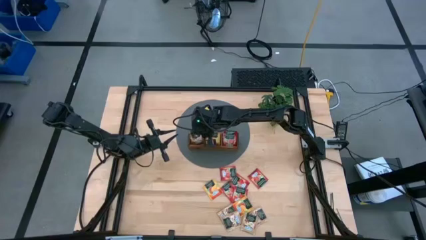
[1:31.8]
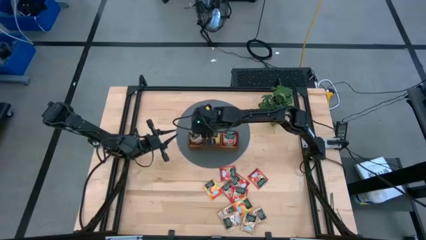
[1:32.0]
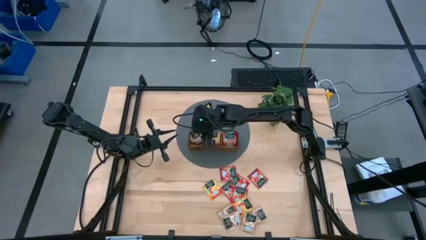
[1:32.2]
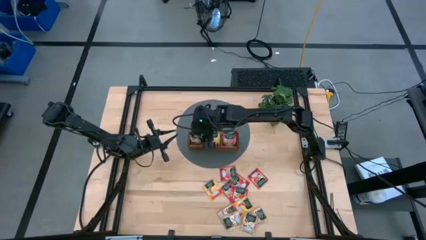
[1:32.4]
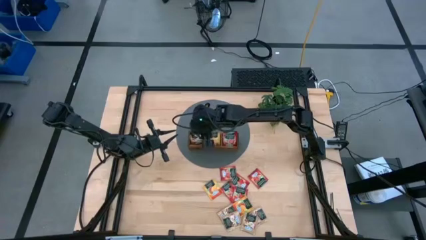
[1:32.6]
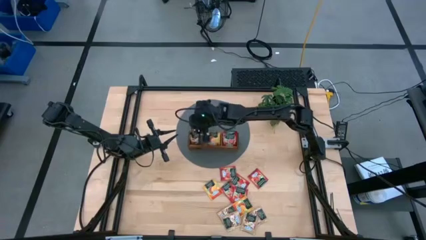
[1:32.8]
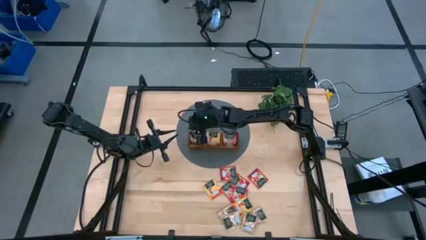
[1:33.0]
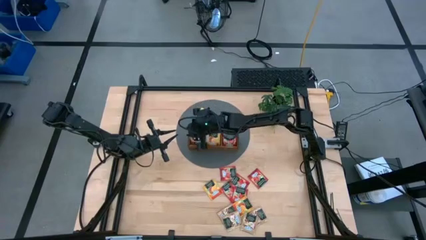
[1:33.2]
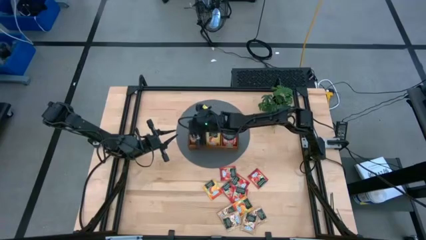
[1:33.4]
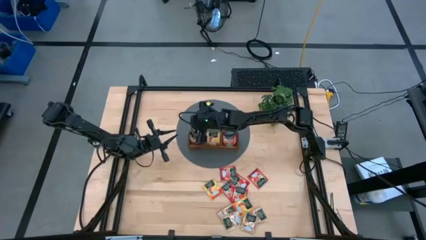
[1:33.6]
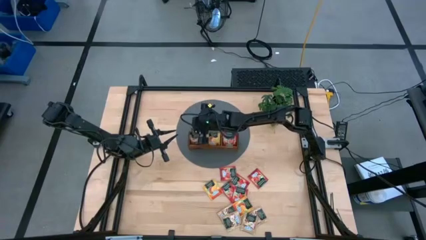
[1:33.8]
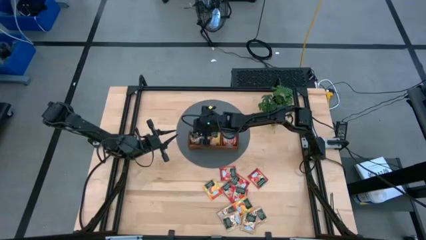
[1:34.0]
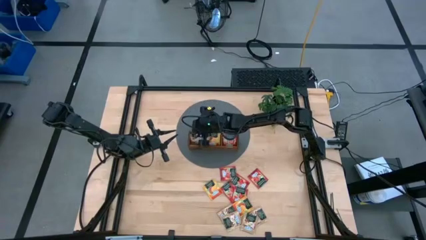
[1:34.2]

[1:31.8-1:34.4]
Task: Pick & Place Tea
Adjust the brown tea bags into the left section of wooden organizer

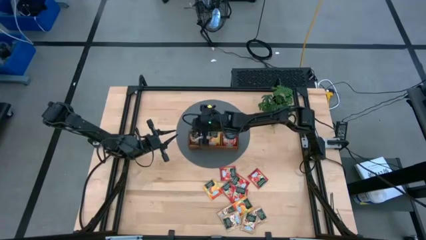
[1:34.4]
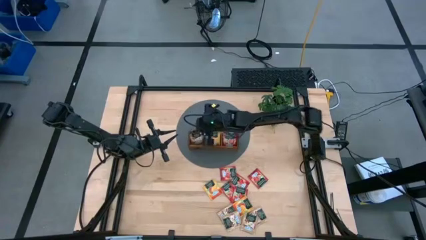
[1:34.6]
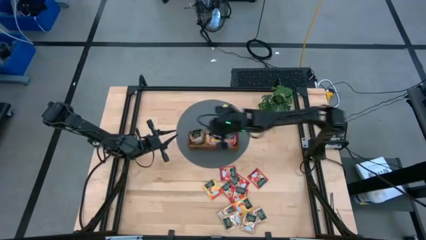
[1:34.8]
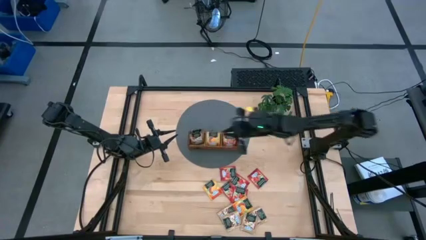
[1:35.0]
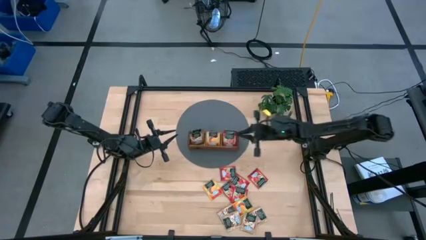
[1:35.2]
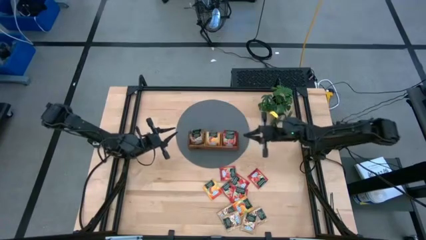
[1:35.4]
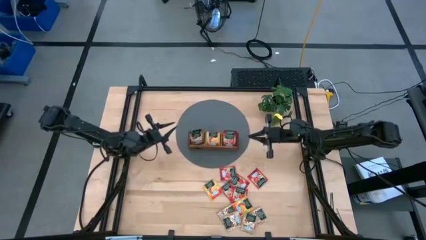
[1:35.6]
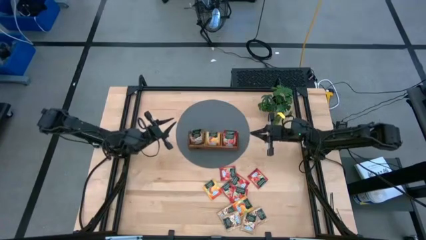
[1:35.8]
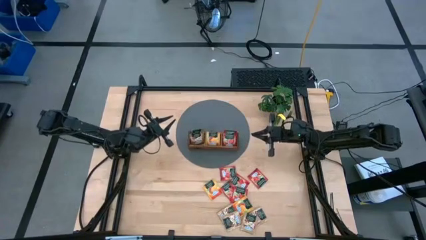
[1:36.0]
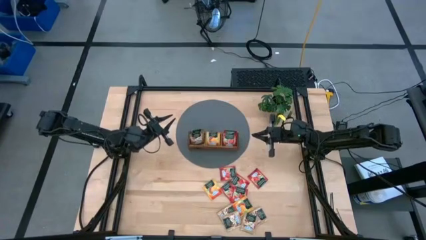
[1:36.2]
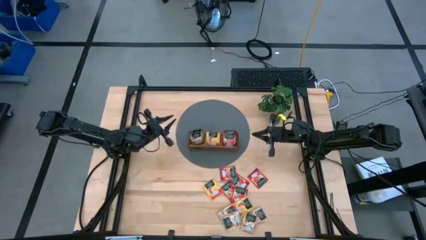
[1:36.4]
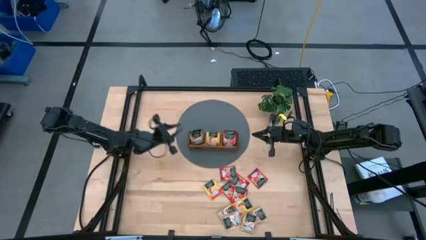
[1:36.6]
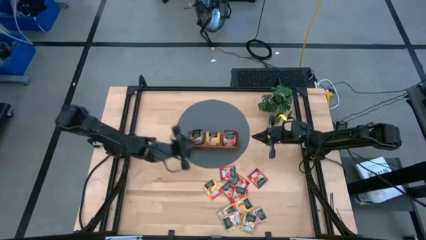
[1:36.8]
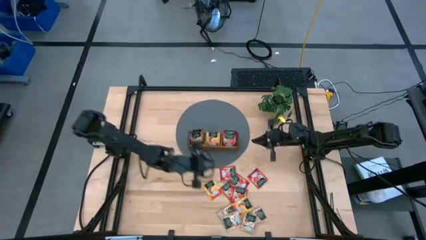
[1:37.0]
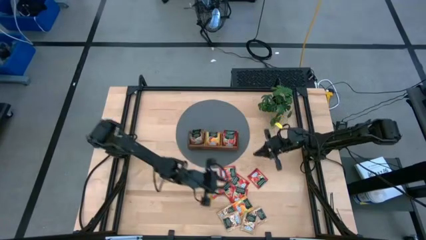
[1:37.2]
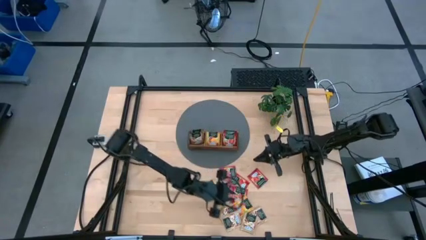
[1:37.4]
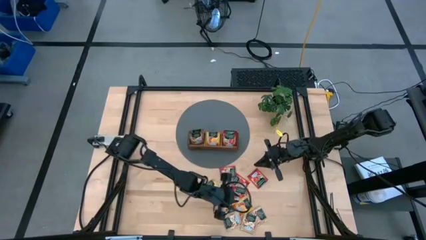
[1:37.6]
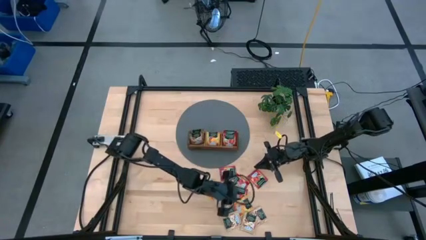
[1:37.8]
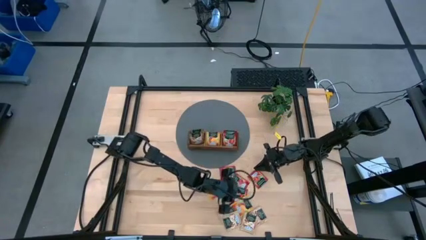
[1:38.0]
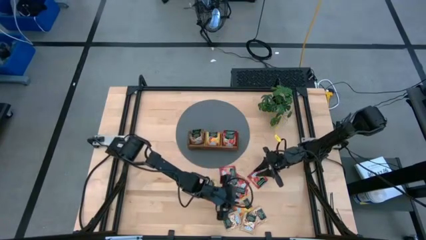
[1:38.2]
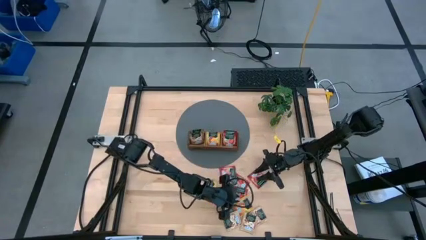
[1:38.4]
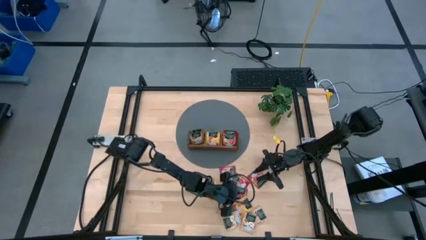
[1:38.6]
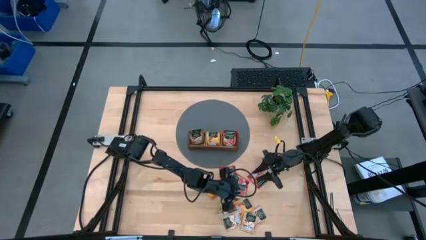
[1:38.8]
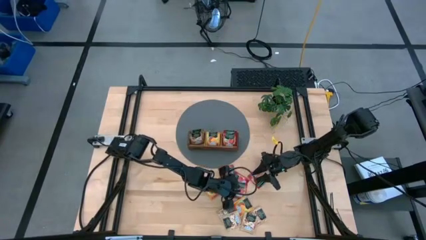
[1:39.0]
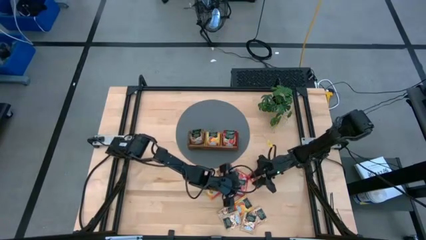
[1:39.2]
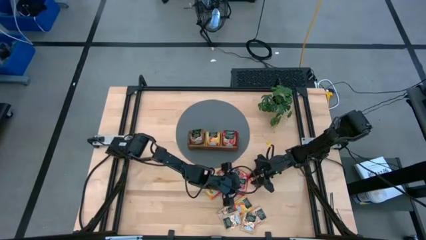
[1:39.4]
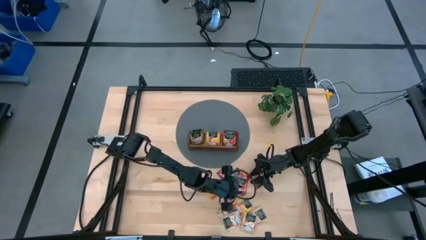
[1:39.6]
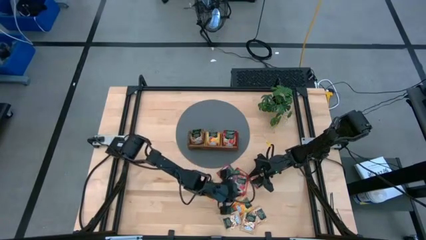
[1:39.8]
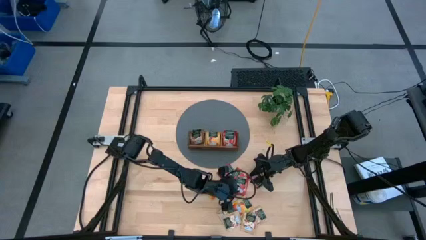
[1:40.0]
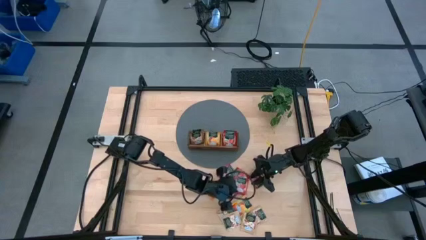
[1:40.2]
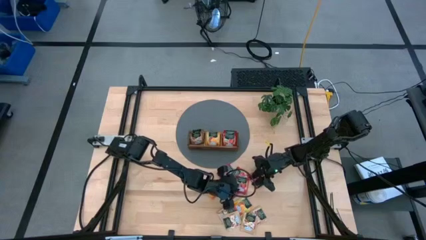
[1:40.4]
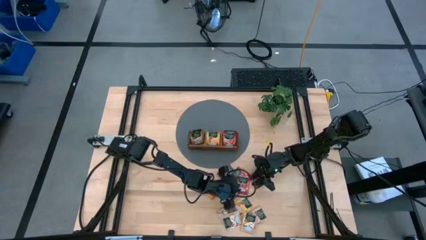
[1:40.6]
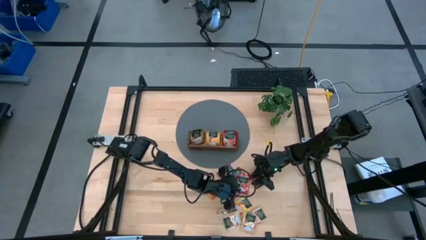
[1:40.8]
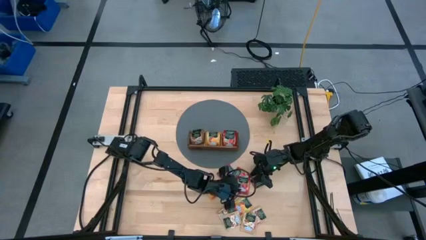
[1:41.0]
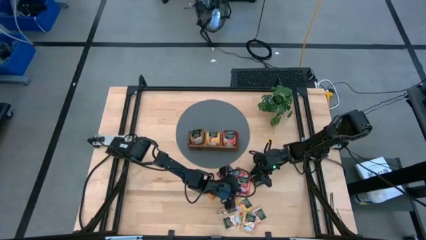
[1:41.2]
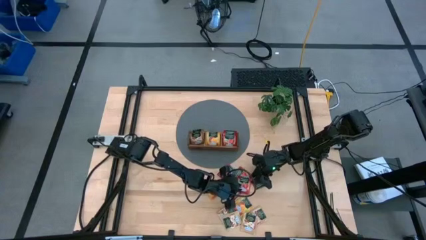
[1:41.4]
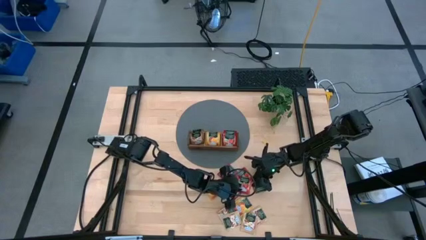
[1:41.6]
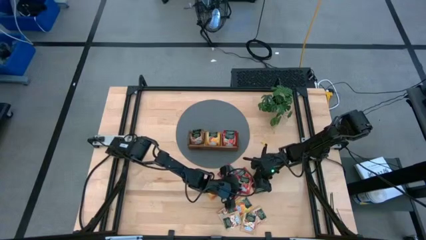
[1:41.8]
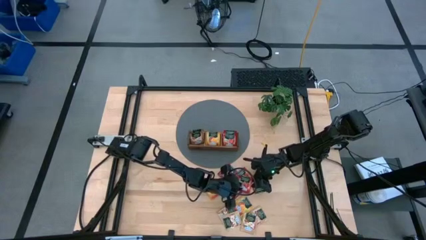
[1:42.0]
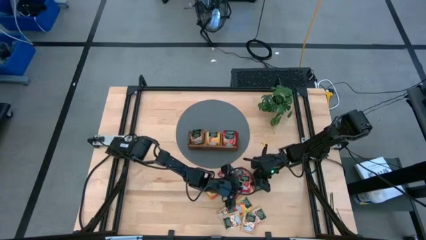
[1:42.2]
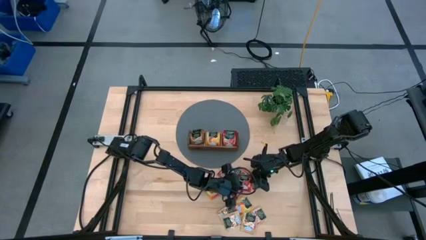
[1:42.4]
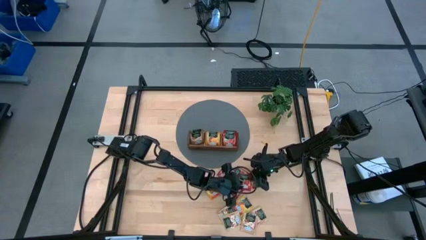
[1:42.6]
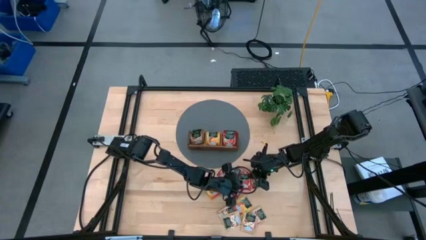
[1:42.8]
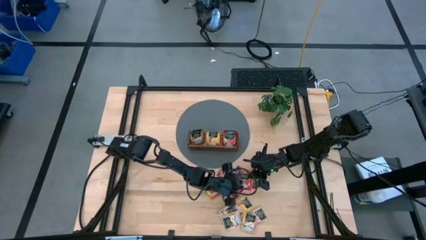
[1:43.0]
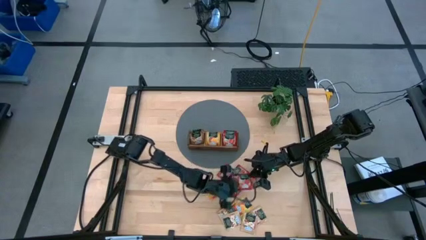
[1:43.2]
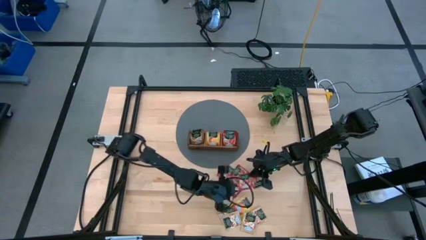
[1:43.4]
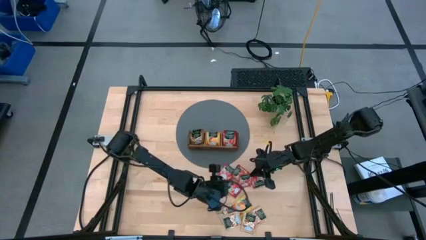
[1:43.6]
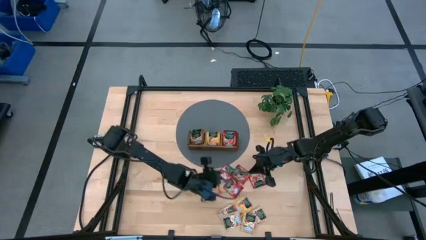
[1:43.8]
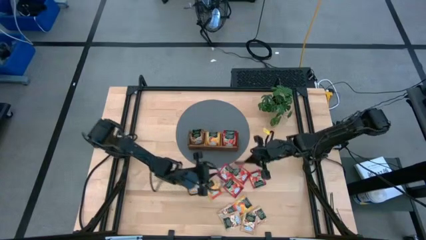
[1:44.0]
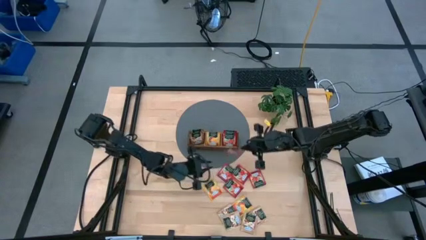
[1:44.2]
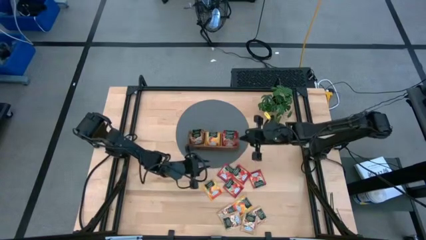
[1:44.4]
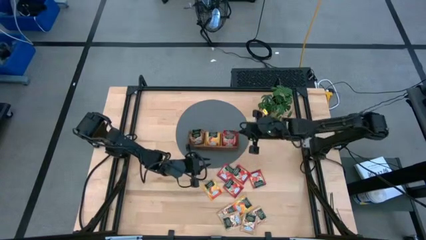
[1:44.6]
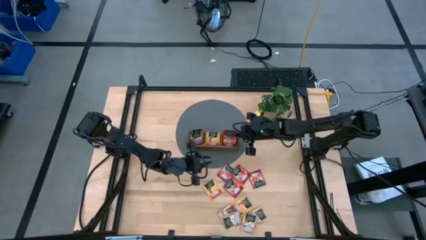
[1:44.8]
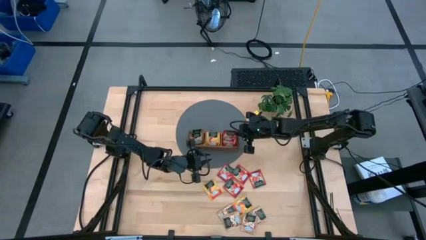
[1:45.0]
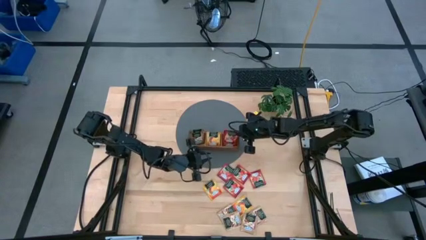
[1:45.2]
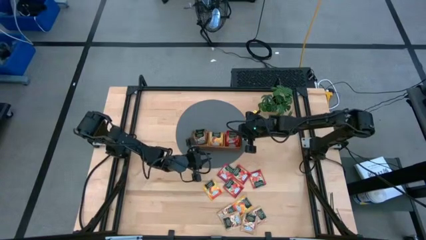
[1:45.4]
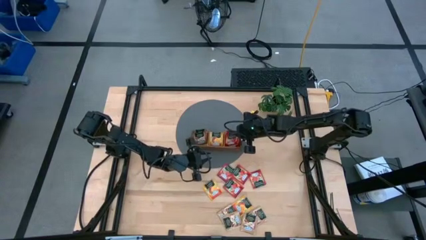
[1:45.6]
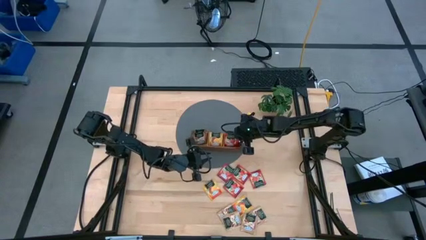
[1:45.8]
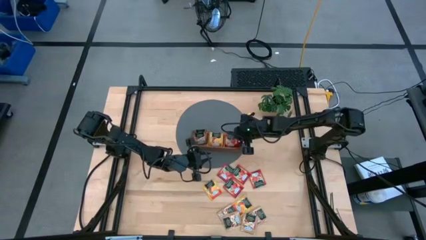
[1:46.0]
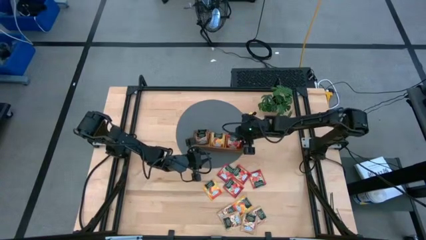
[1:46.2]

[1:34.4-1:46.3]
Put the red tea bag into the right section of the wooden organizer
